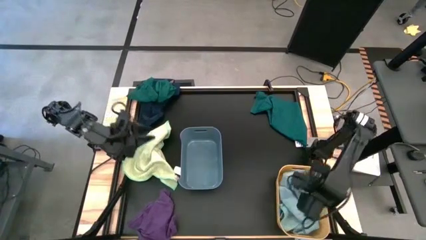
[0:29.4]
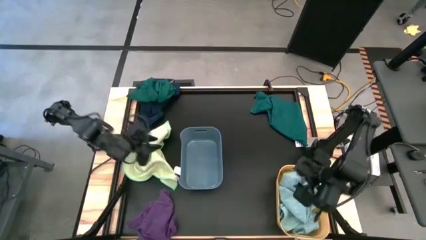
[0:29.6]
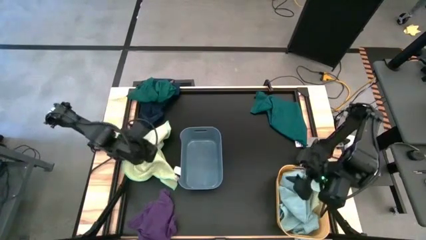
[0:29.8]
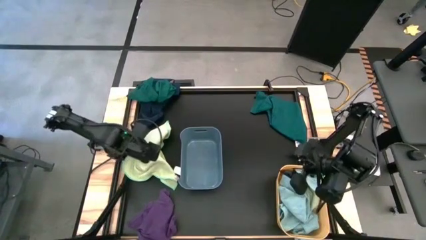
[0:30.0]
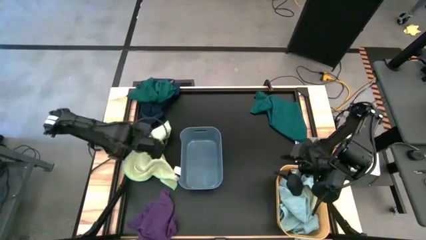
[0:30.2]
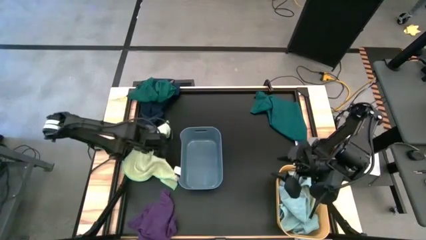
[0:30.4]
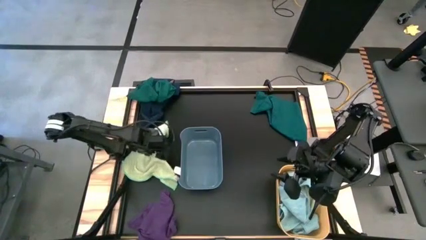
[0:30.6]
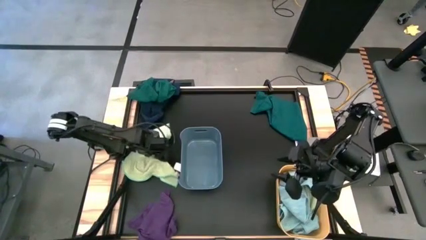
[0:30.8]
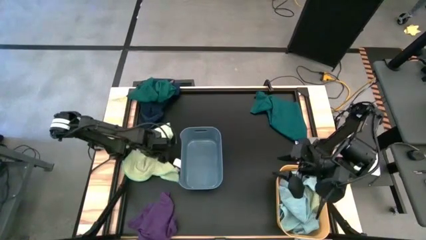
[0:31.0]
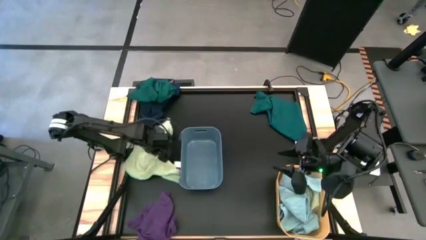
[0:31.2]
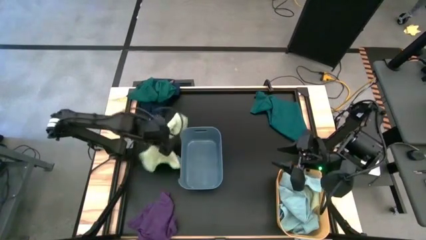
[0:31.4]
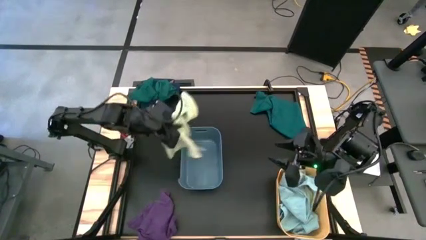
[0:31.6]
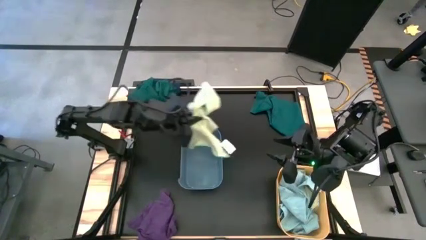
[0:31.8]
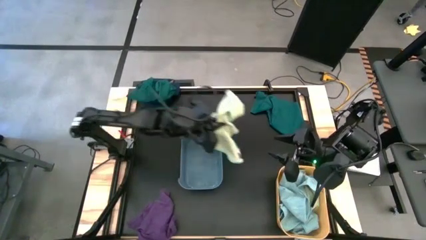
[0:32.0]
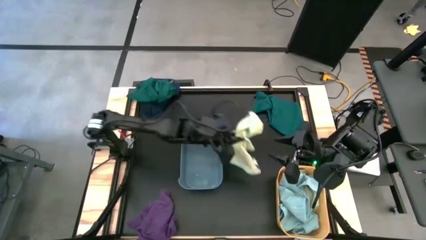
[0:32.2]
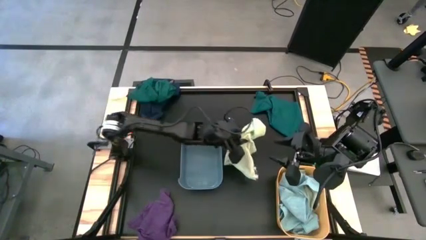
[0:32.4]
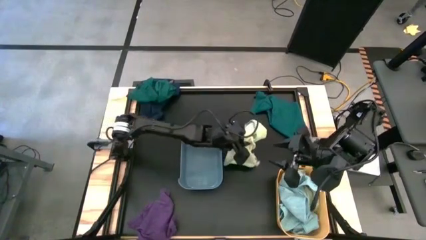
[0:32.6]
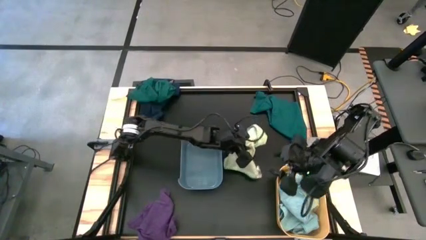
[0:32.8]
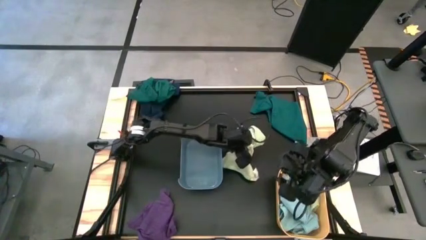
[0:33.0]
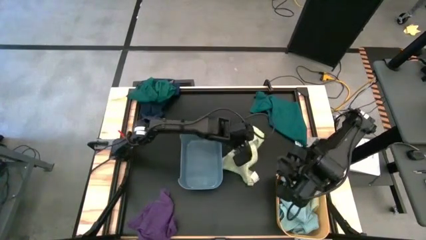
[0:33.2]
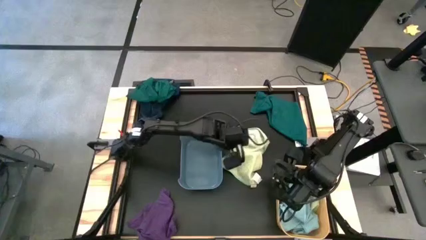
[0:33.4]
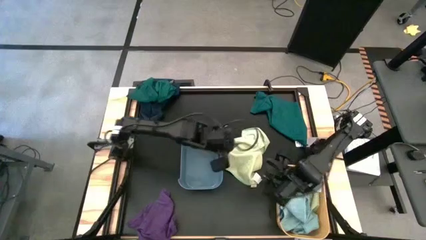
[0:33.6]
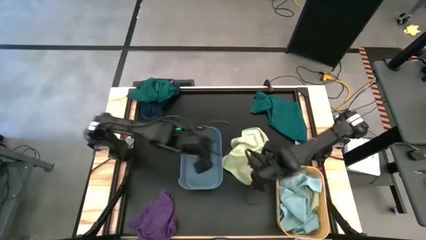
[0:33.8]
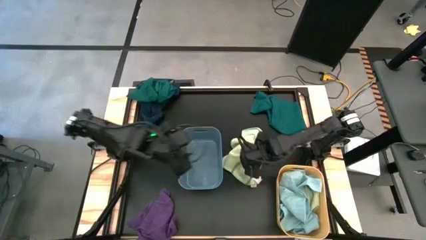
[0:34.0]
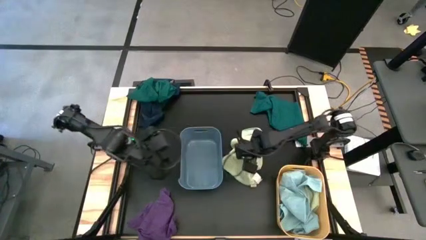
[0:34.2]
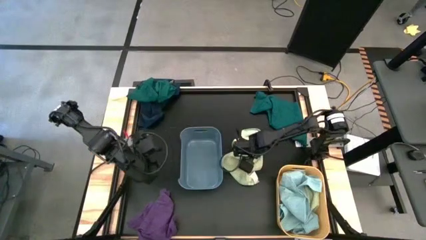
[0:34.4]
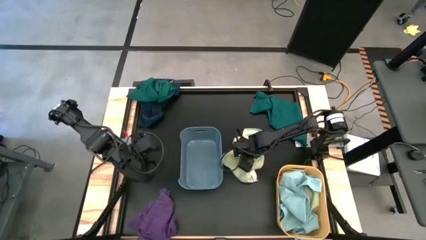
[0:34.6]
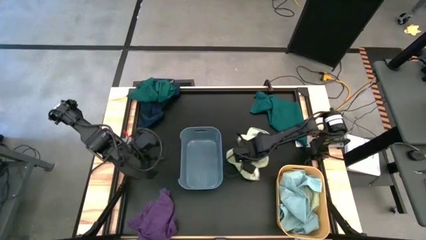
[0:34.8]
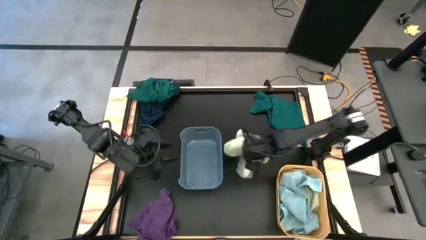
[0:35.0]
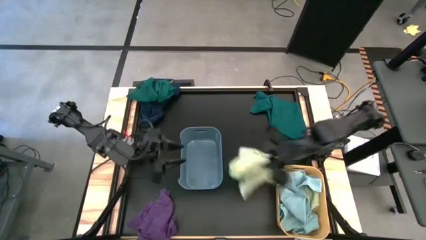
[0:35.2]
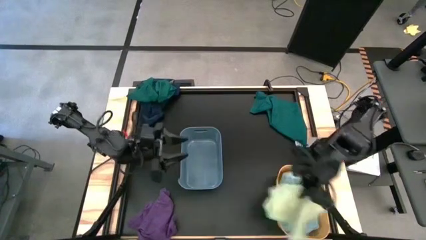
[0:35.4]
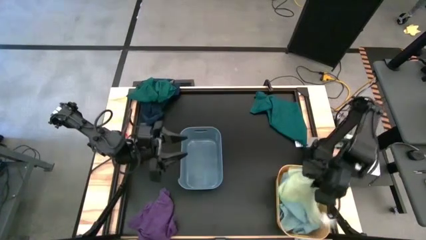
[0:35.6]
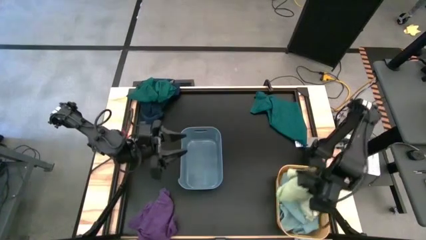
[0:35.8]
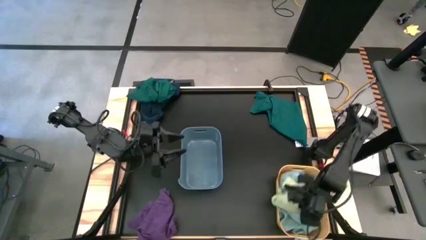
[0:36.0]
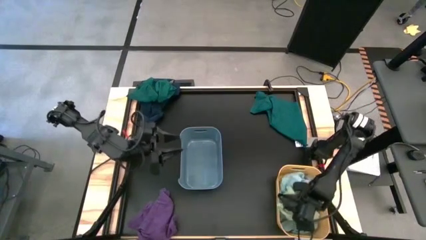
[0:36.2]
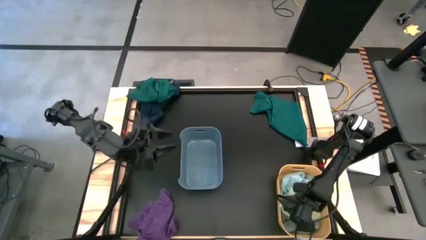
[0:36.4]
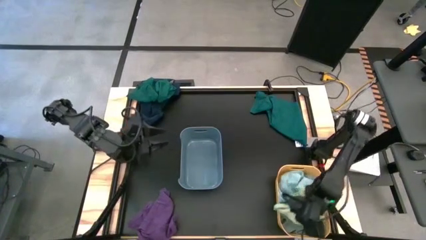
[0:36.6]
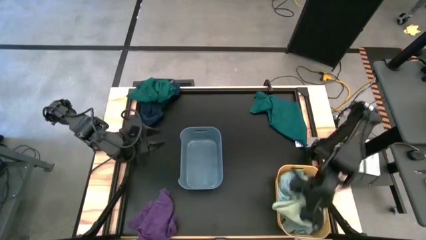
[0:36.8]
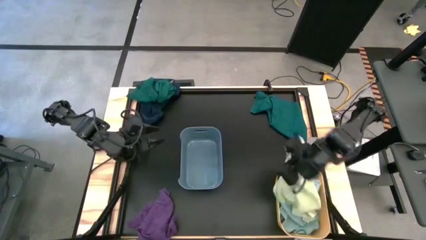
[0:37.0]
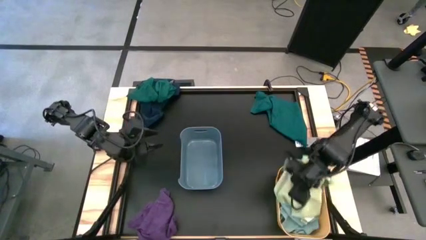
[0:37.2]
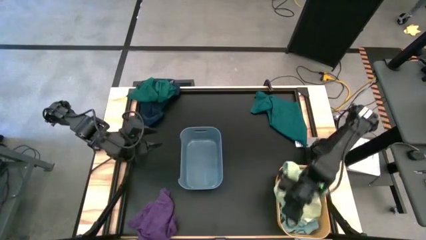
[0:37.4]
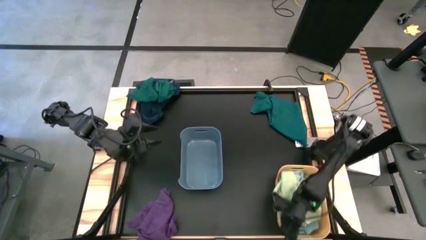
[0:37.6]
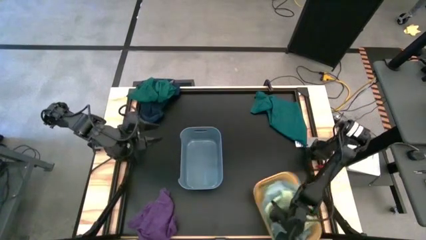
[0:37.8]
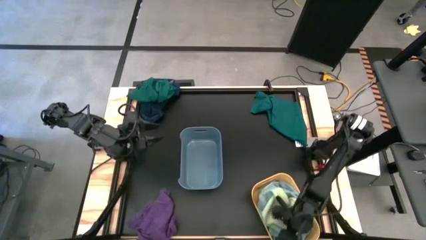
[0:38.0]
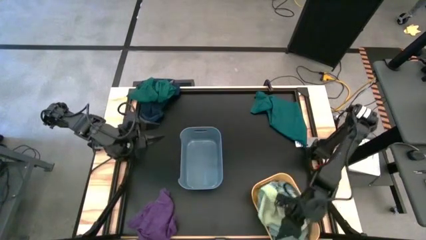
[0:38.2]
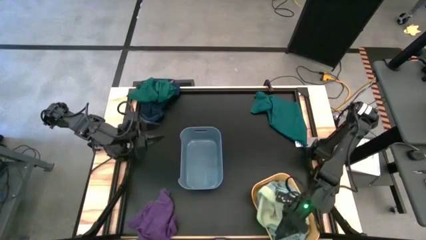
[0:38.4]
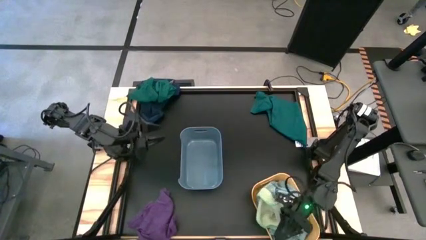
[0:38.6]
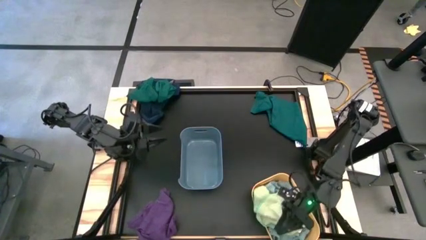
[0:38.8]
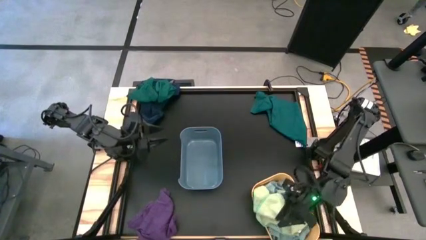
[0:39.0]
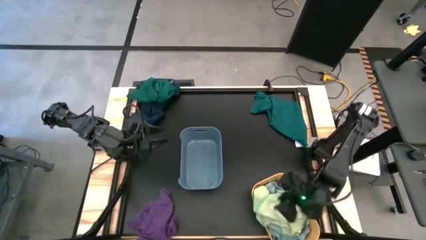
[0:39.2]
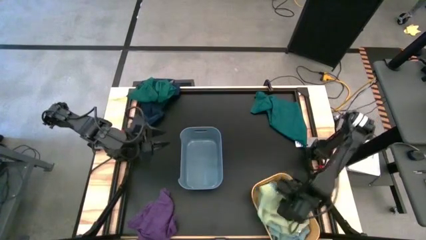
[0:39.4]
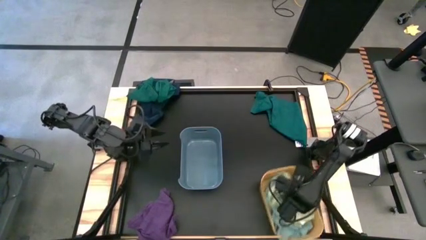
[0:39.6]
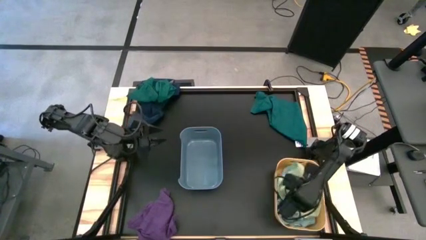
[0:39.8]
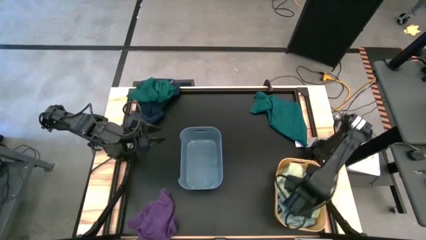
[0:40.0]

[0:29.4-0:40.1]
Task: Sort microfiber towel by color & place in baskets
Put the light green microfiber cloth into the yellow bin

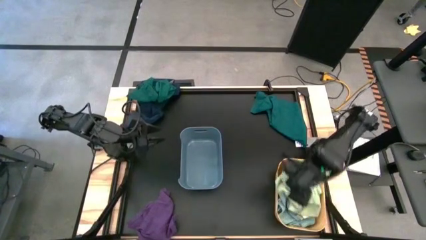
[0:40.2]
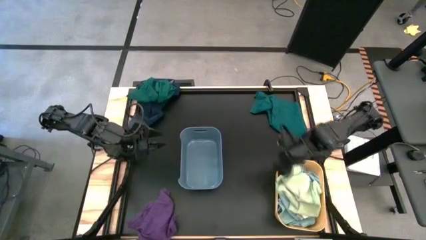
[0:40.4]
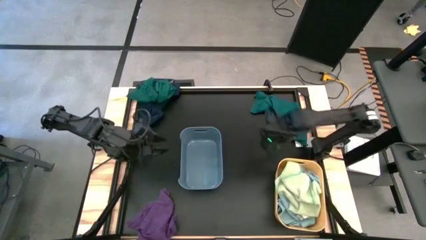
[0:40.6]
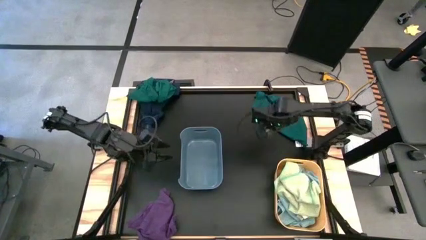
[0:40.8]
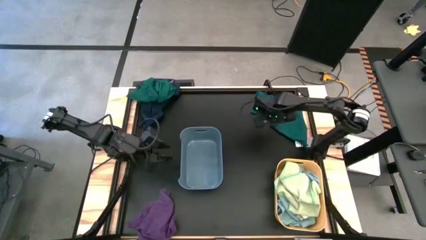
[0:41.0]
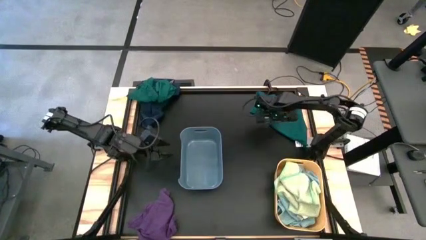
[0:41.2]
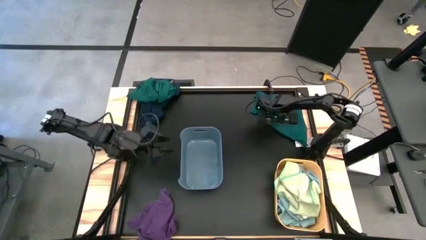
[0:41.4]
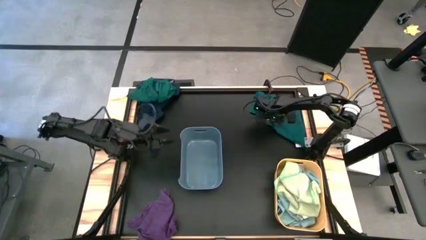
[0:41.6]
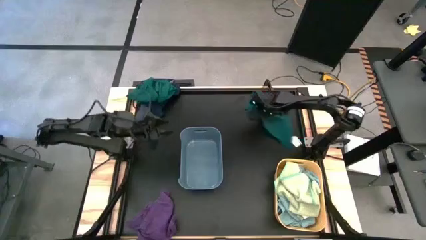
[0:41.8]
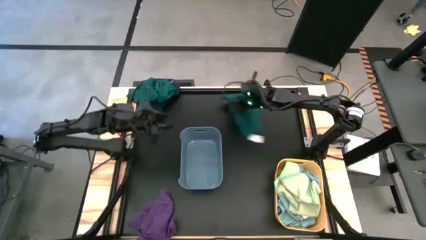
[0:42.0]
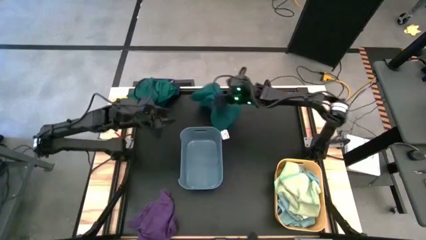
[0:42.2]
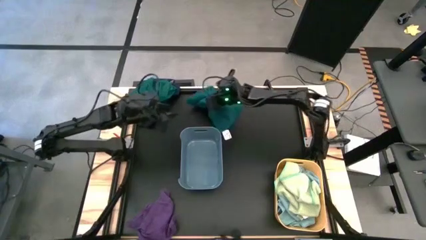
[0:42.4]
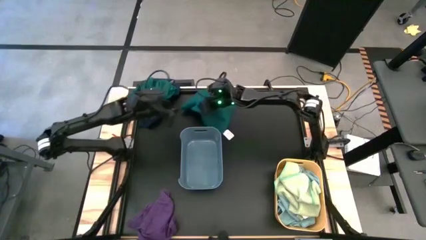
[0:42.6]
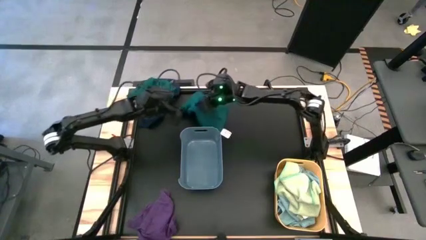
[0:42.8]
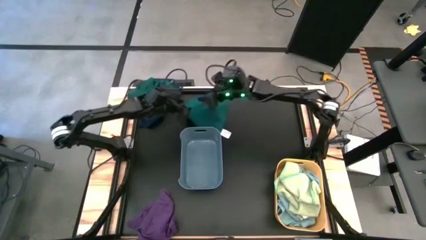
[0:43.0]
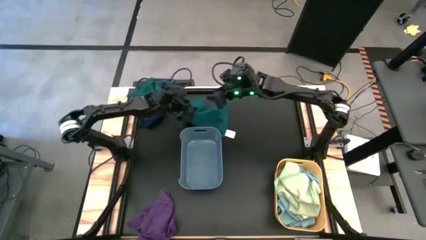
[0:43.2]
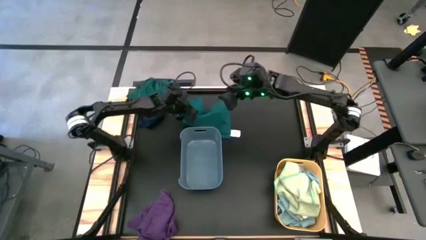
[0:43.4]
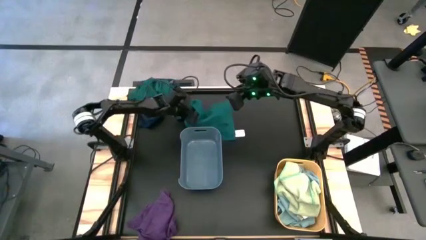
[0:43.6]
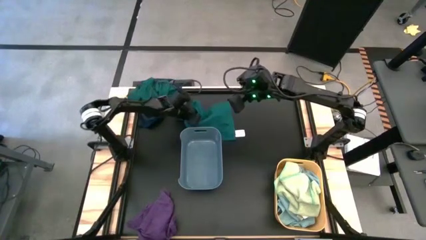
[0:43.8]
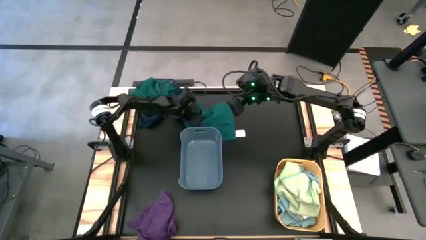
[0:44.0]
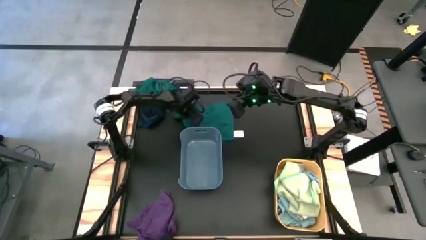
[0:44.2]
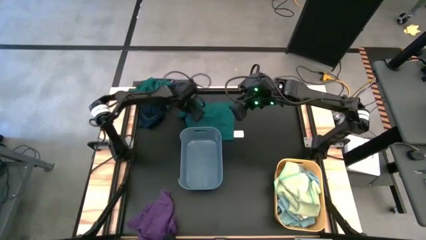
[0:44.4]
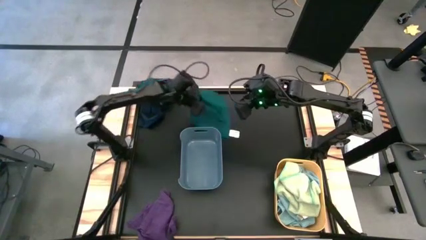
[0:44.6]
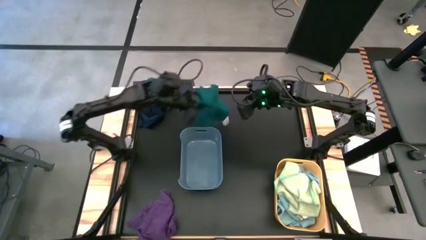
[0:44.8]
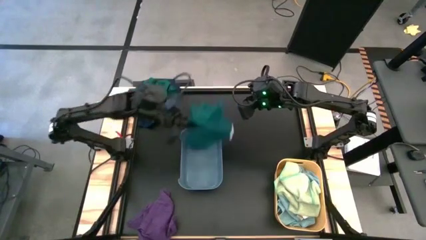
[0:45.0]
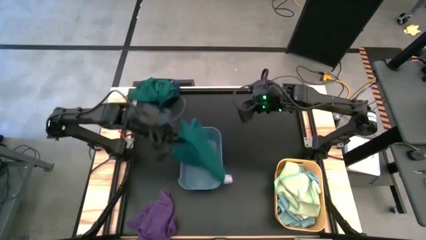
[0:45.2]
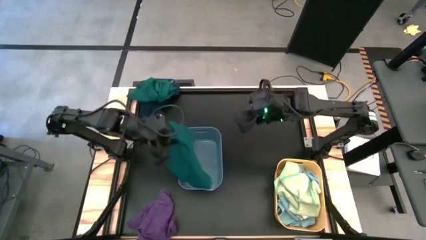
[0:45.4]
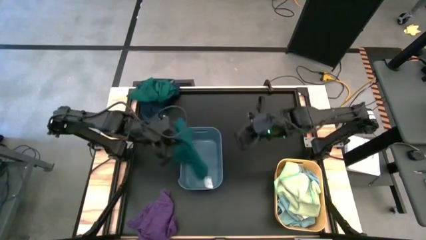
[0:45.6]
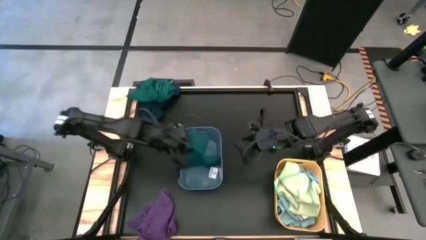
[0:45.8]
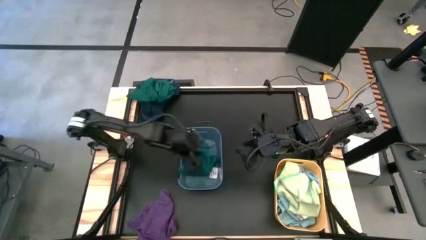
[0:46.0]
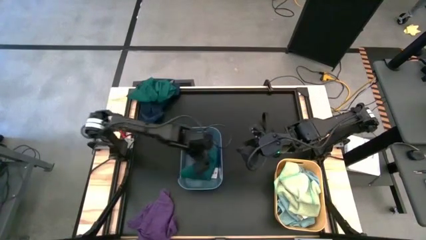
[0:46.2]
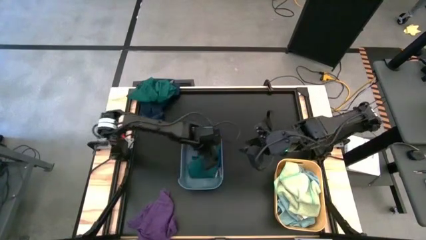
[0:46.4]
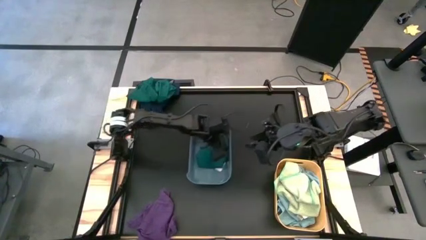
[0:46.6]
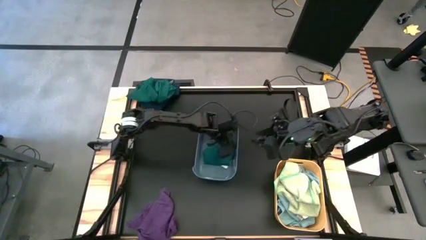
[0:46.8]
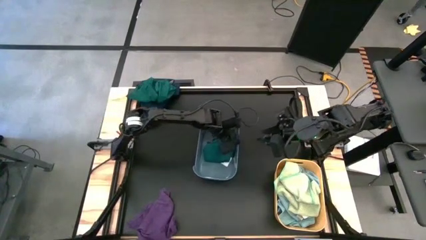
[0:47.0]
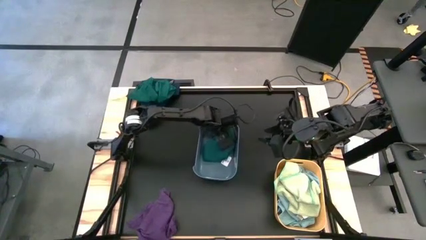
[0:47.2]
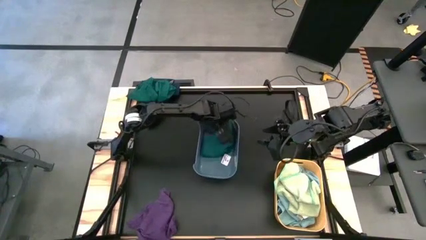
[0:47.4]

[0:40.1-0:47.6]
Put the right dark green microfiber cloth into the blue bin
